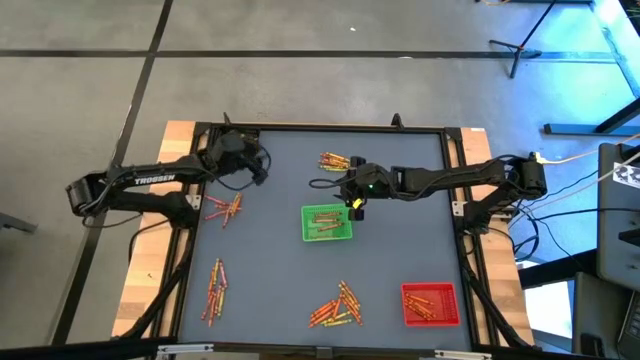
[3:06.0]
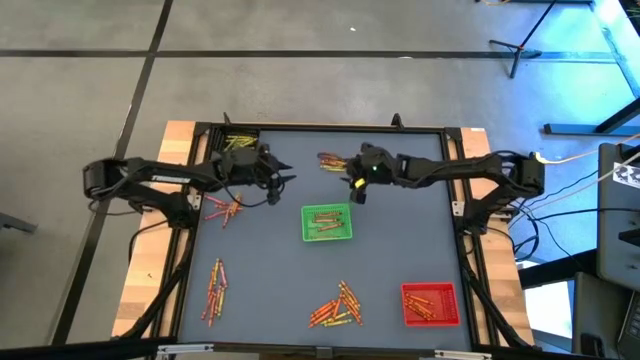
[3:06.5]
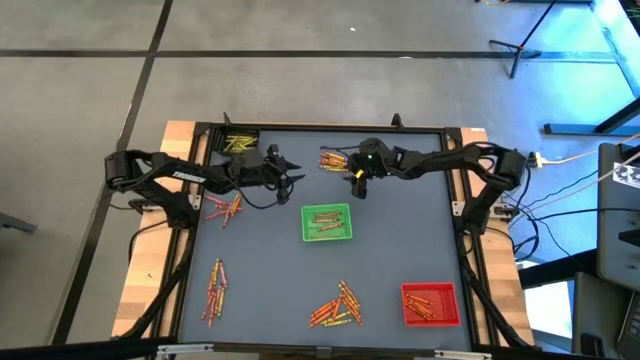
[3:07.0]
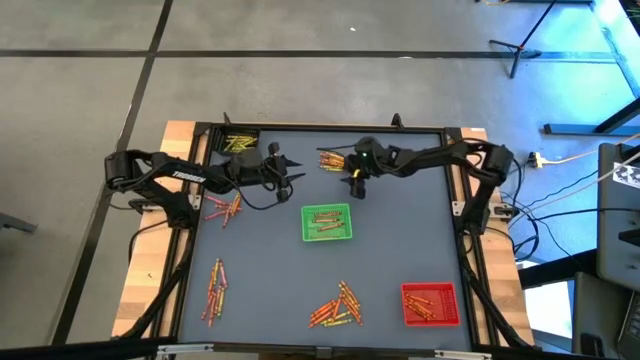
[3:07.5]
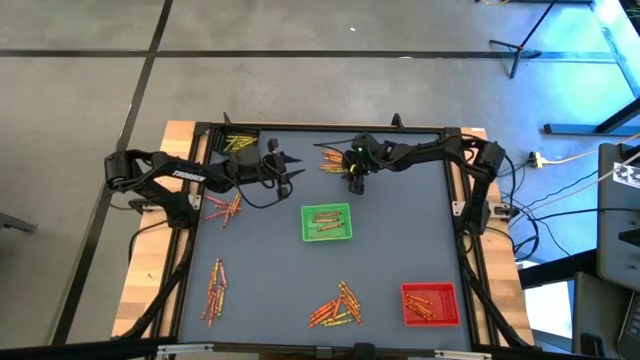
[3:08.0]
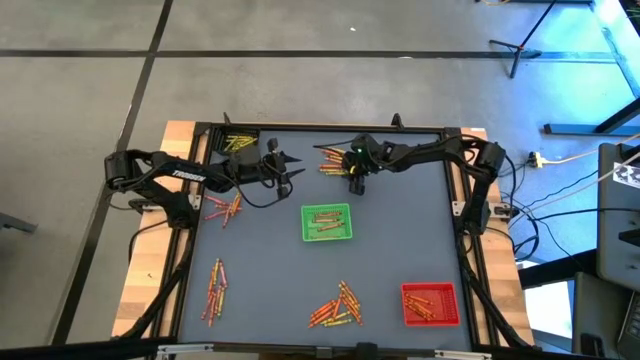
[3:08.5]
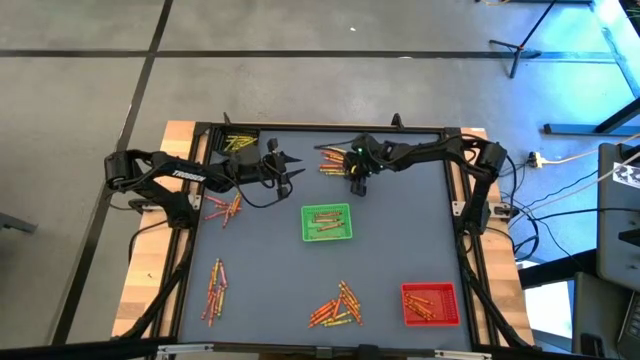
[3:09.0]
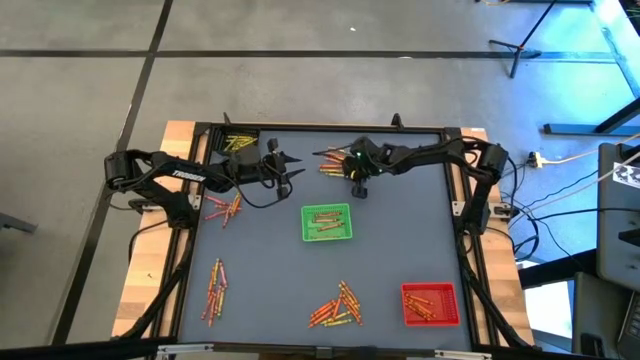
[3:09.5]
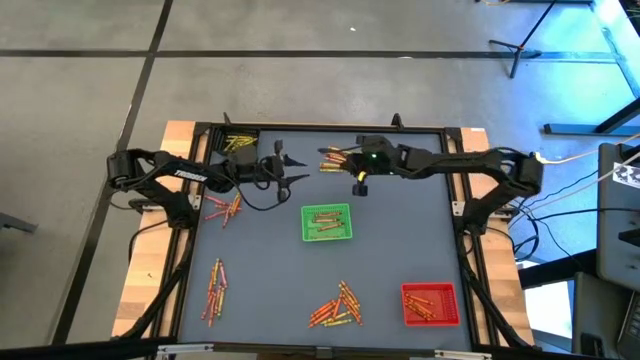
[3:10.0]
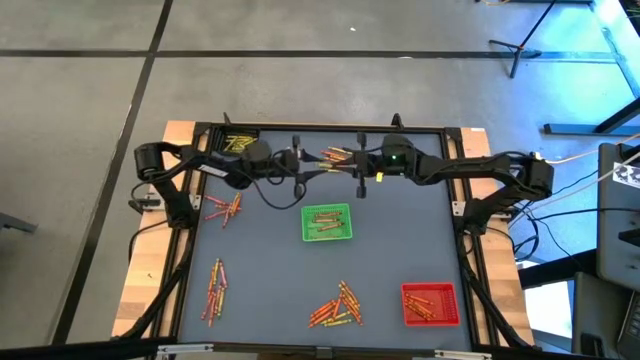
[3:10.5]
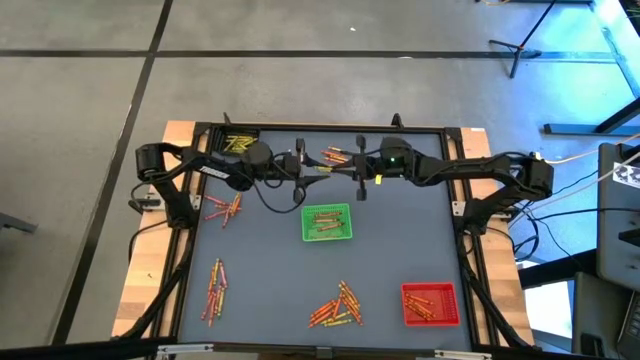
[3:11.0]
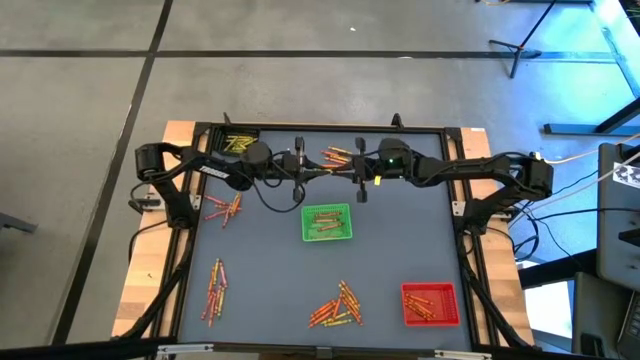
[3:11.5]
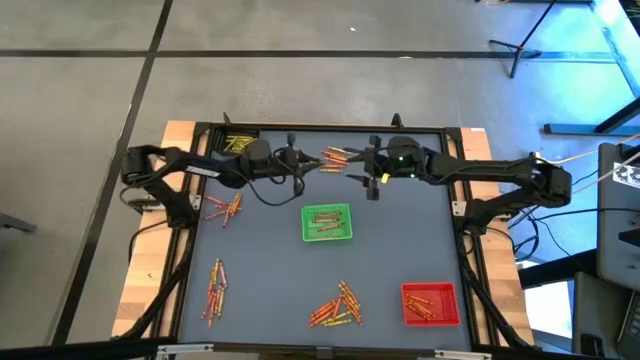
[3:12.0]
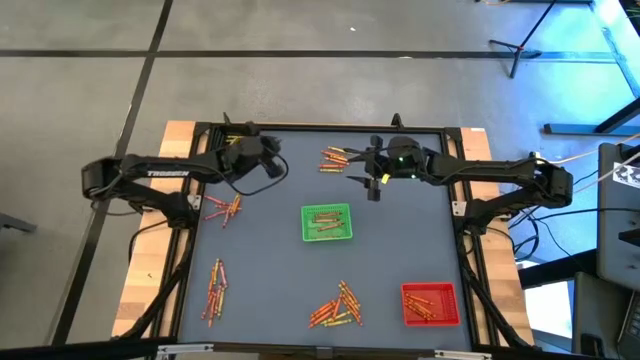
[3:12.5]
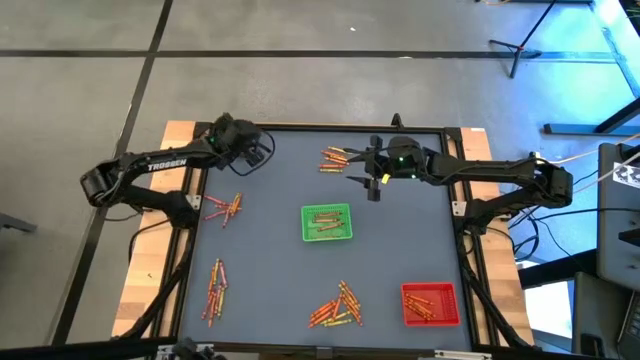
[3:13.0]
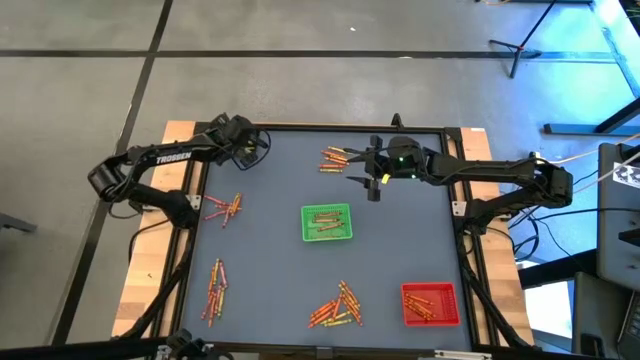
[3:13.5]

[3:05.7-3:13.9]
Task: Sort crayons
Put the green crayon into the black bin

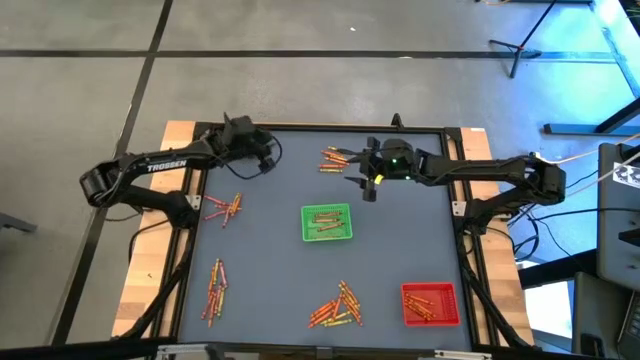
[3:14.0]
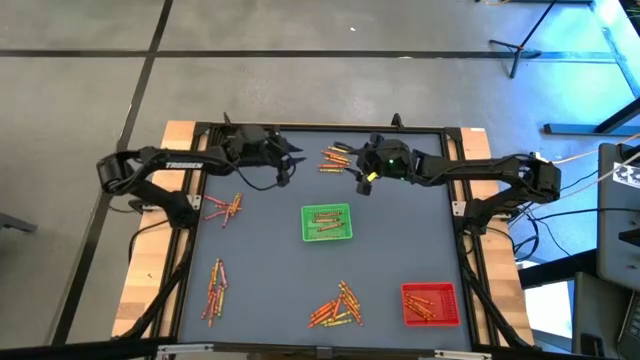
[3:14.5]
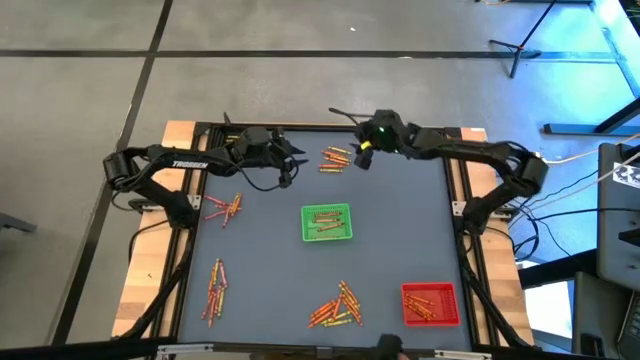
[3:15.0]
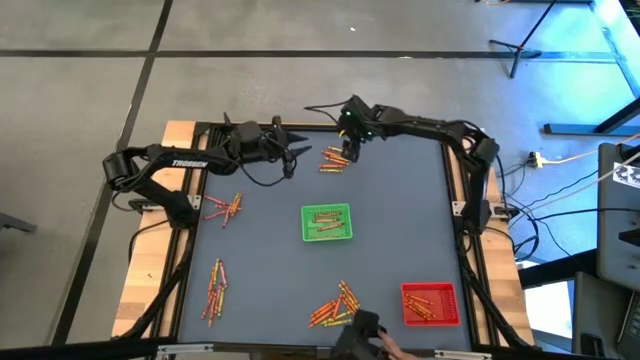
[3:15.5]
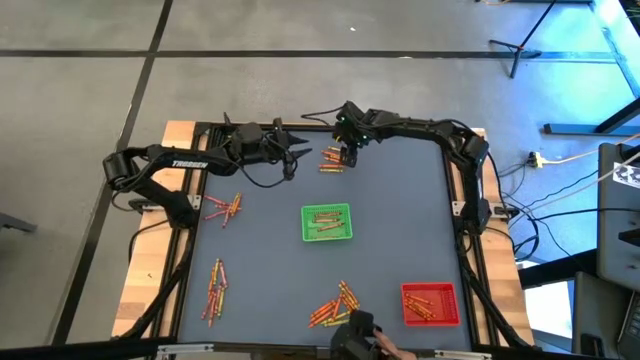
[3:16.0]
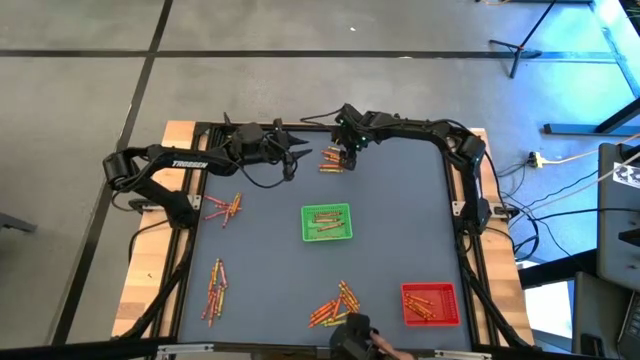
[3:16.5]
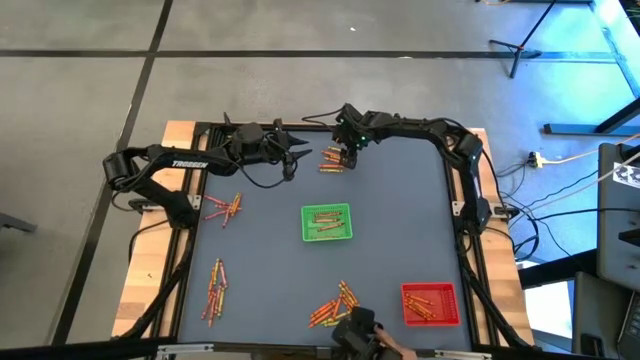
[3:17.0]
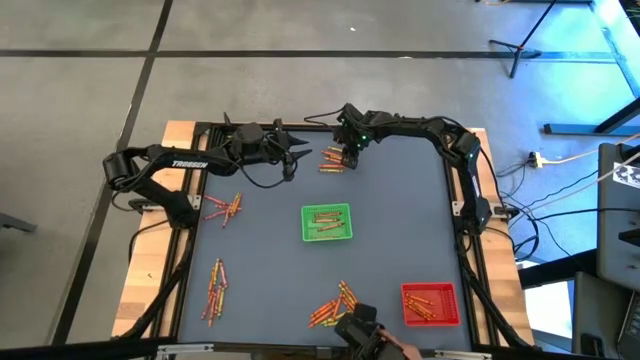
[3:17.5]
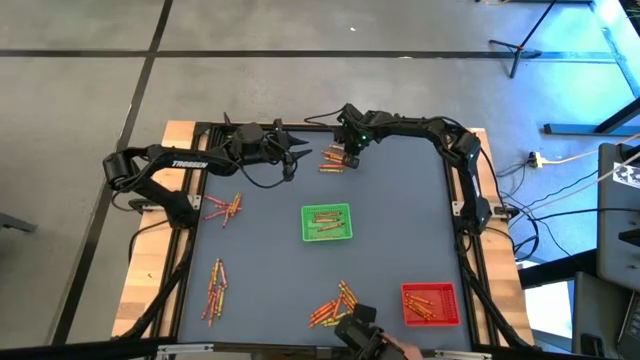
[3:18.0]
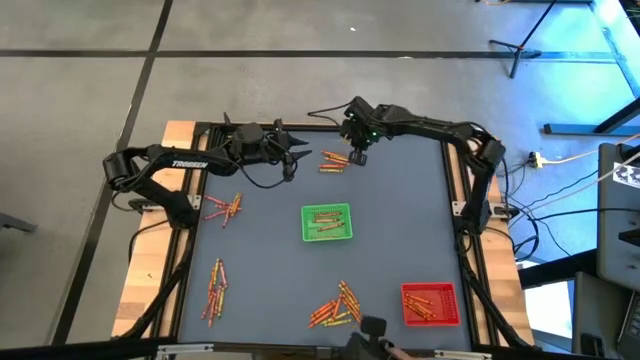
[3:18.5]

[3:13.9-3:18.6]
Put the light green crayon into the black bin

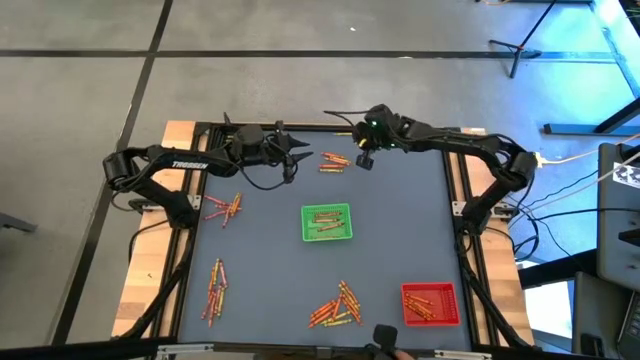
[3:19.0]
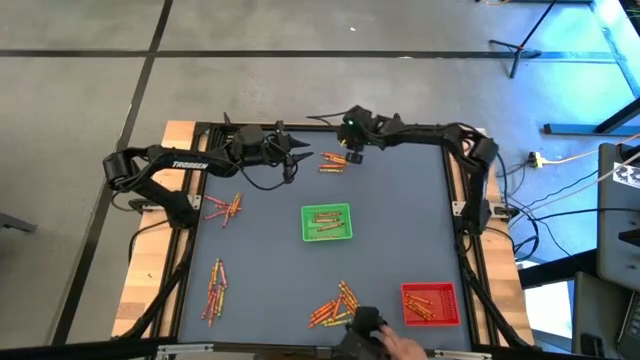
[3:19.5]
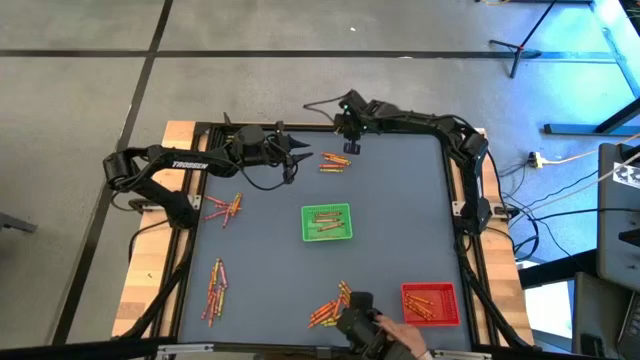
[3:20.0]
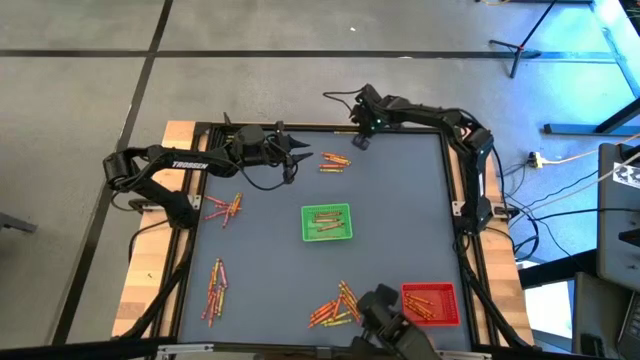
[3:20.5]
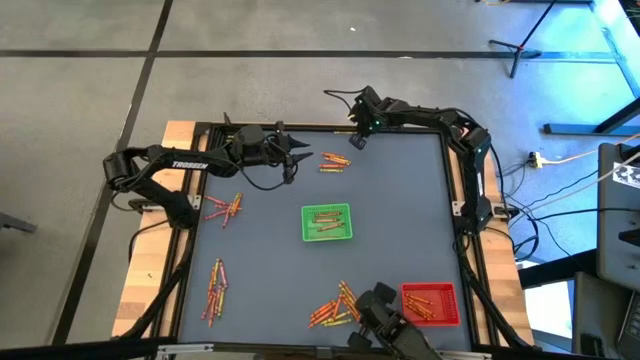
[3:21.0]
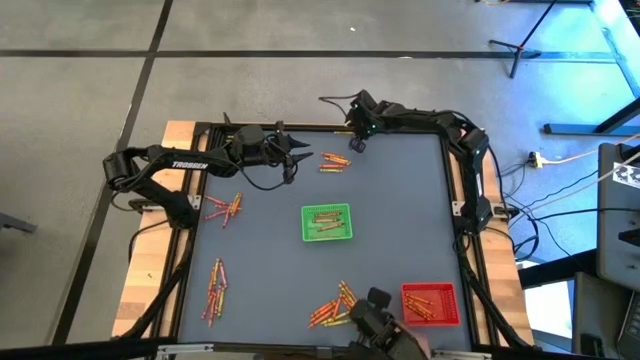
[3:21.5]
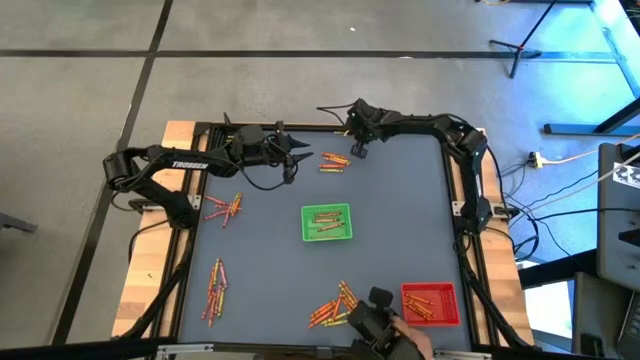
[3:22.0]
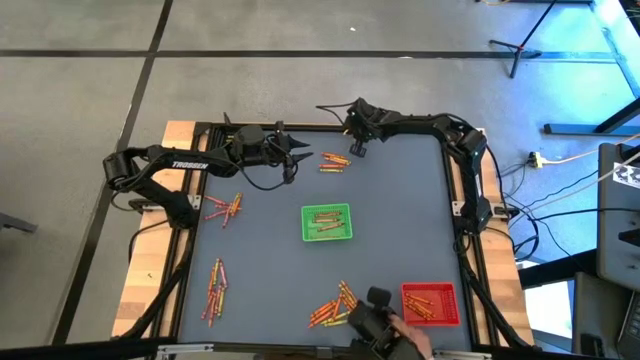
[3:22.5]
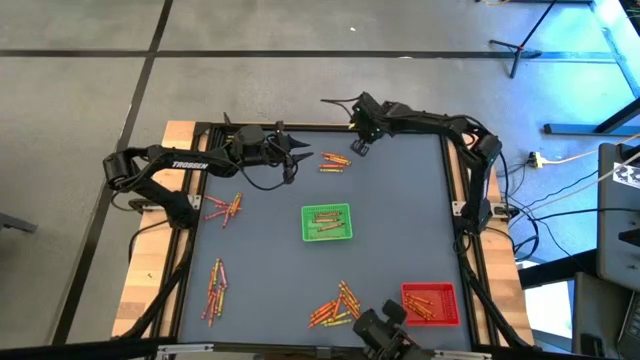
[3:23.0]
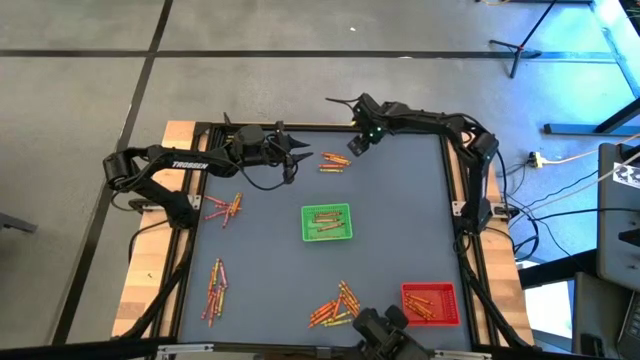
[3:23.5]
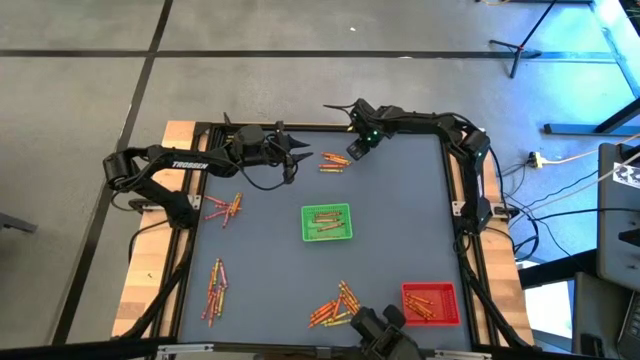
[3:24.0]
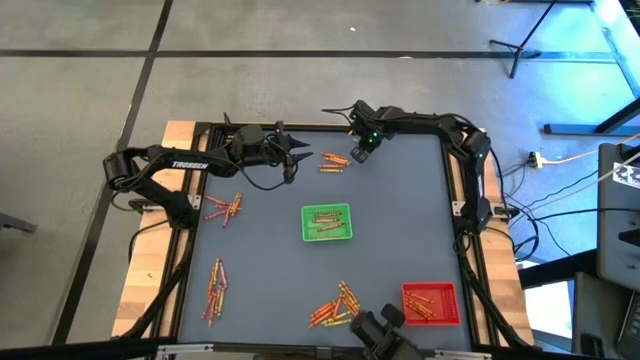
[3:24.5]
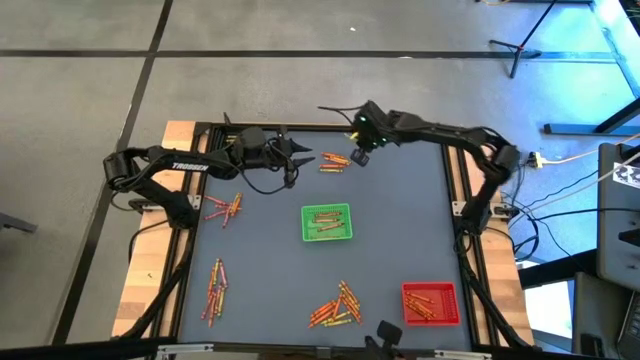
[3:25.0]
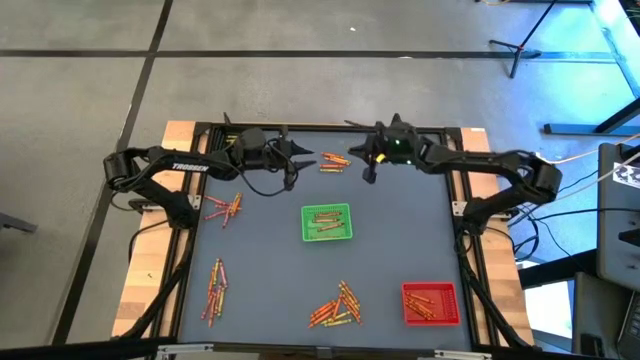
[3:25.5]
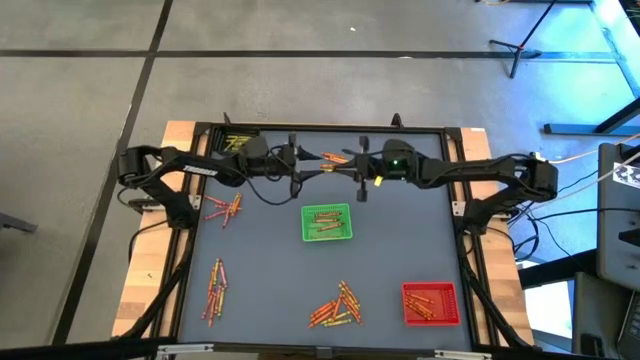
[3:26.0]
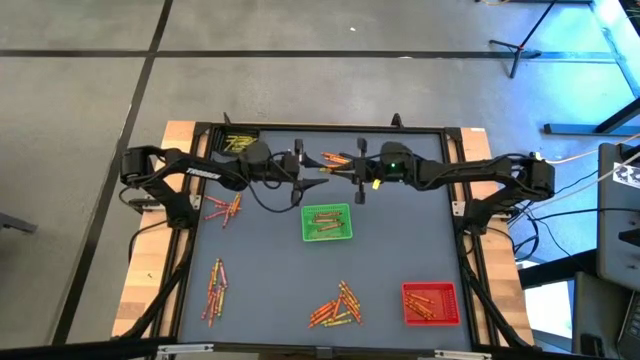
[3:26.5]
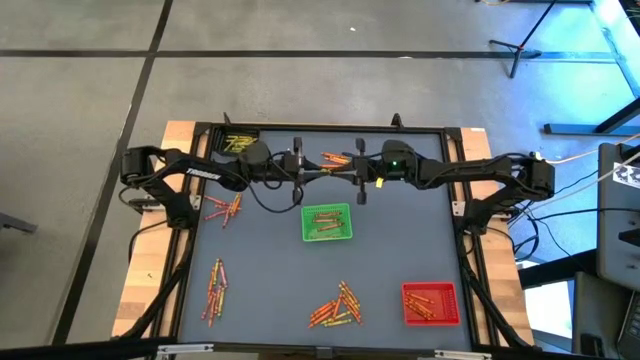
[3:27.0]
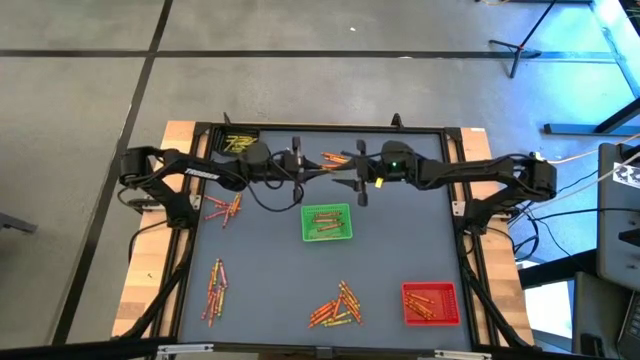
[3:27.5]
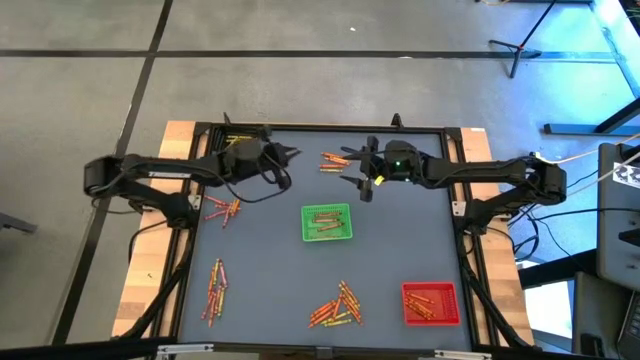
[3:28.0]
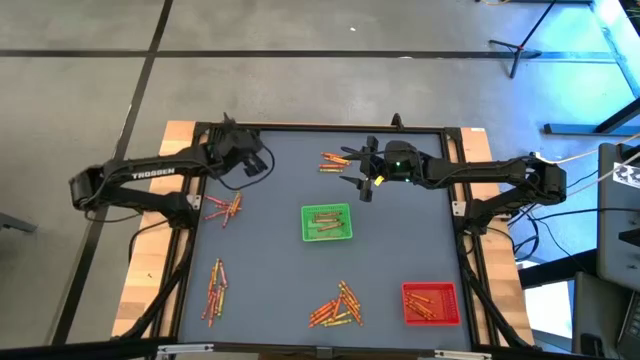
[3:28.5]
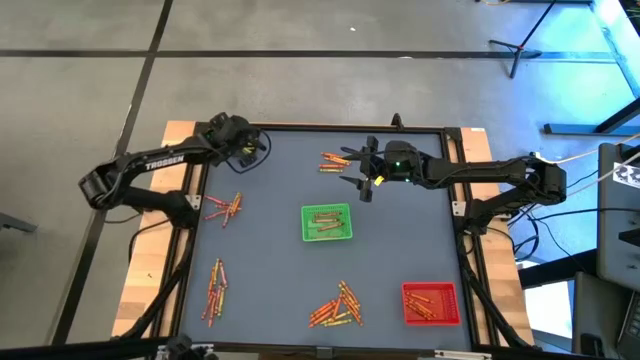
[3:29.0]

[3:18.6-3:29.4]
Put the light green crayon into the black bin
